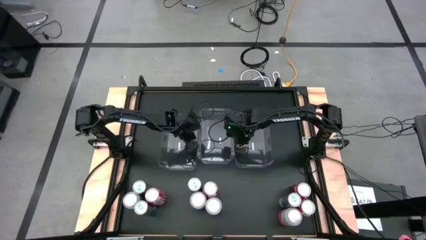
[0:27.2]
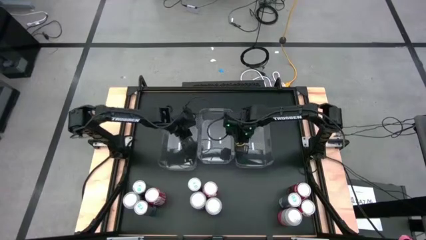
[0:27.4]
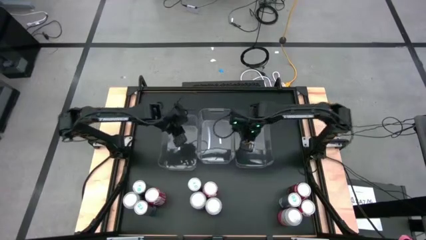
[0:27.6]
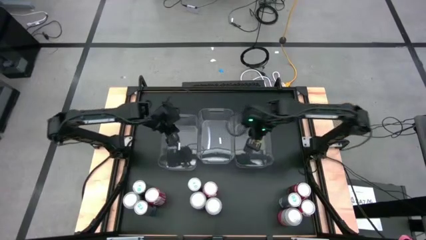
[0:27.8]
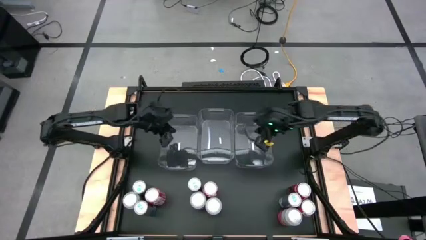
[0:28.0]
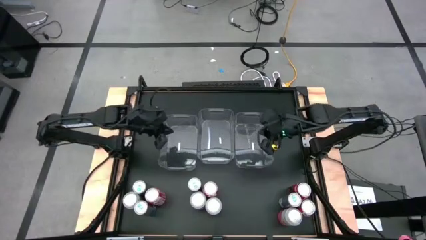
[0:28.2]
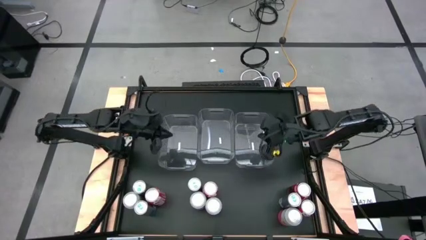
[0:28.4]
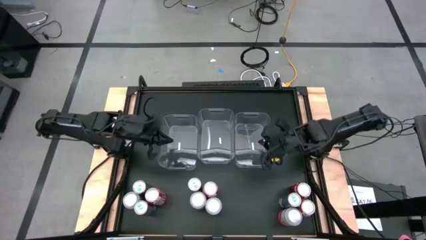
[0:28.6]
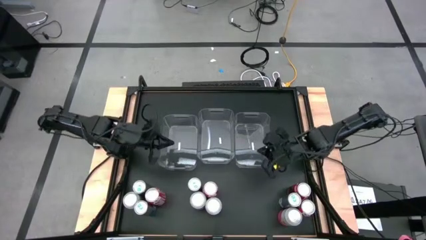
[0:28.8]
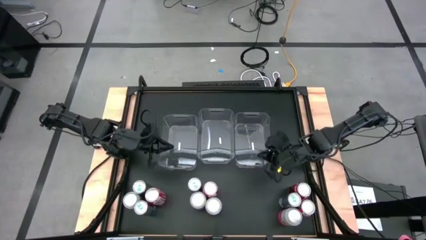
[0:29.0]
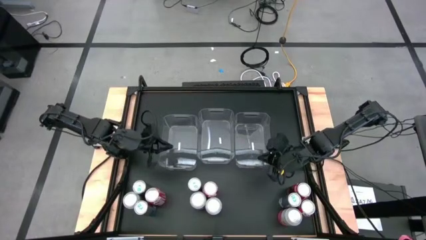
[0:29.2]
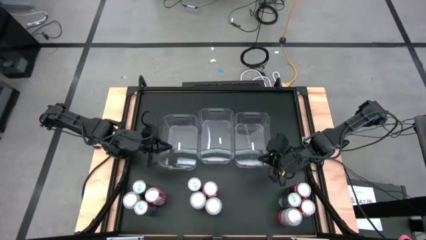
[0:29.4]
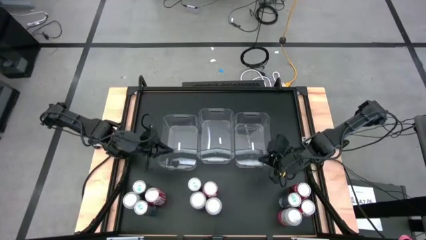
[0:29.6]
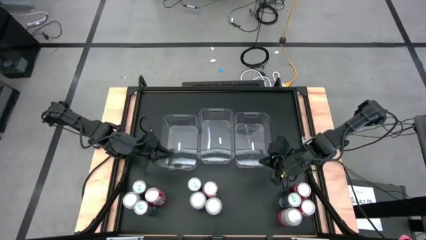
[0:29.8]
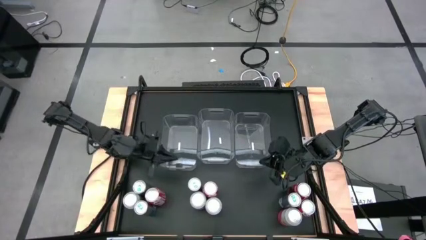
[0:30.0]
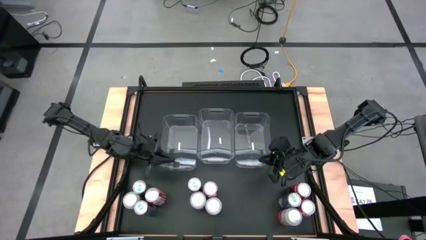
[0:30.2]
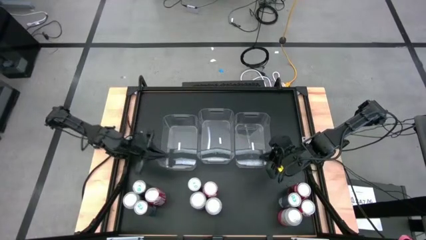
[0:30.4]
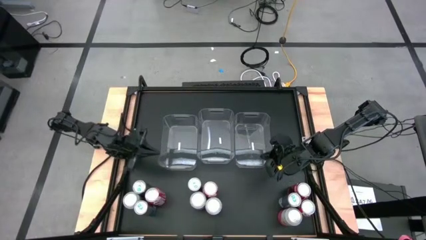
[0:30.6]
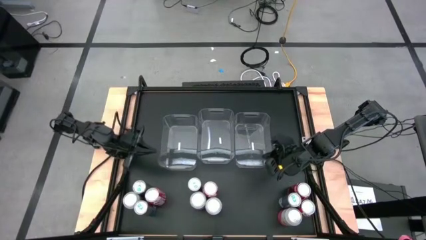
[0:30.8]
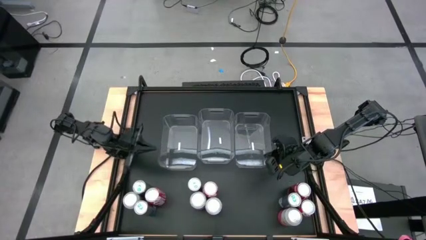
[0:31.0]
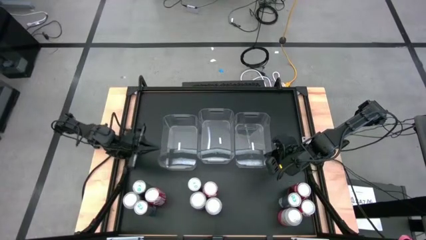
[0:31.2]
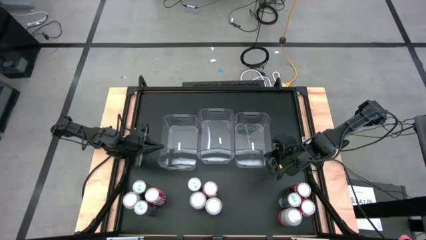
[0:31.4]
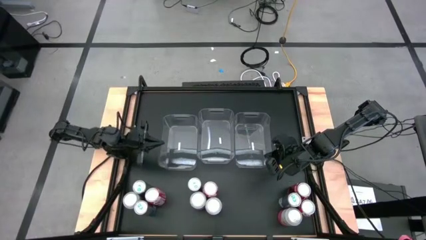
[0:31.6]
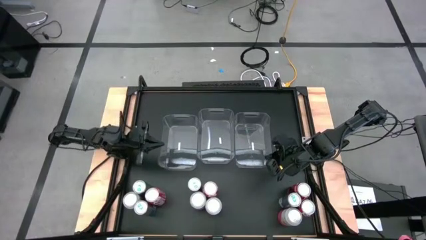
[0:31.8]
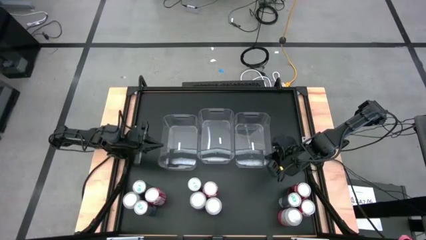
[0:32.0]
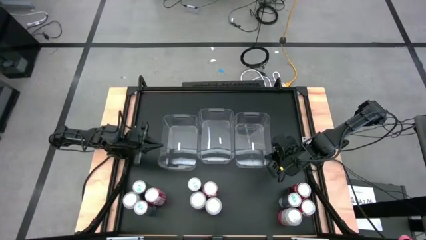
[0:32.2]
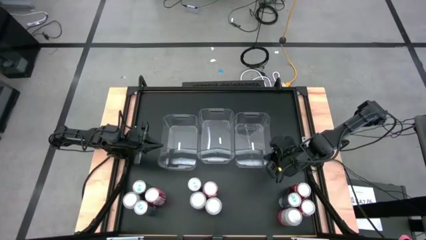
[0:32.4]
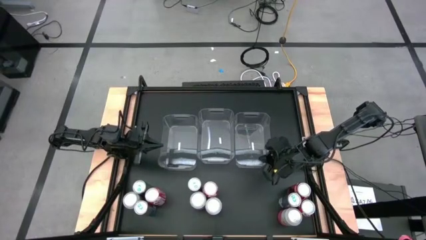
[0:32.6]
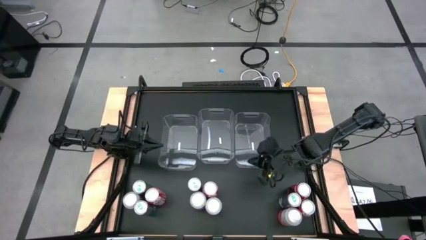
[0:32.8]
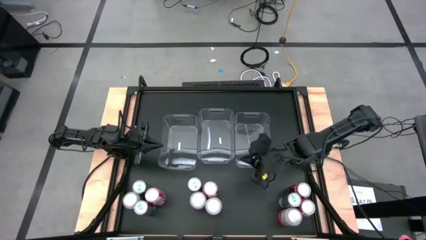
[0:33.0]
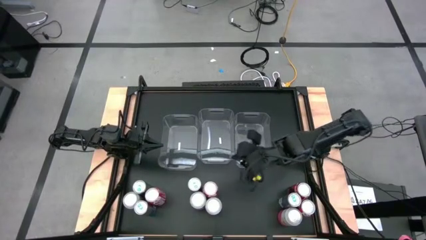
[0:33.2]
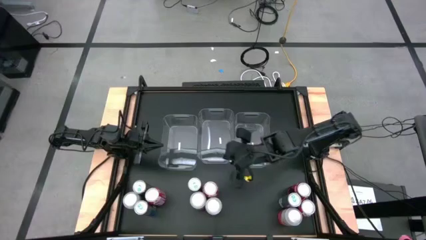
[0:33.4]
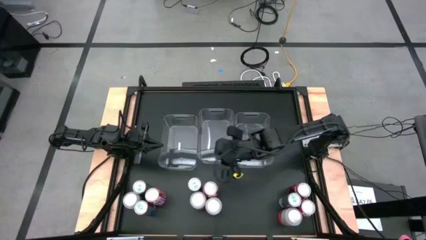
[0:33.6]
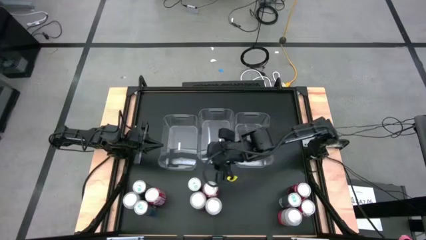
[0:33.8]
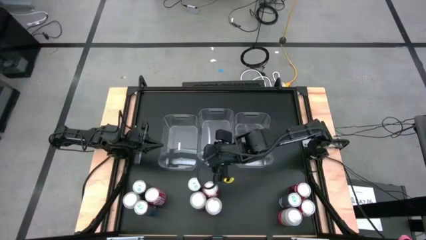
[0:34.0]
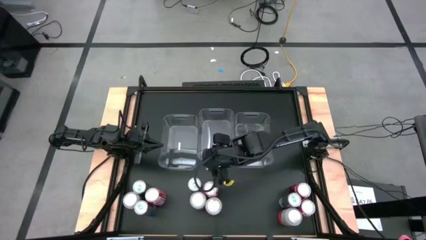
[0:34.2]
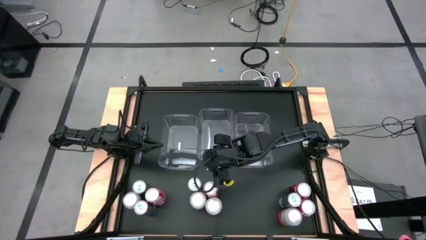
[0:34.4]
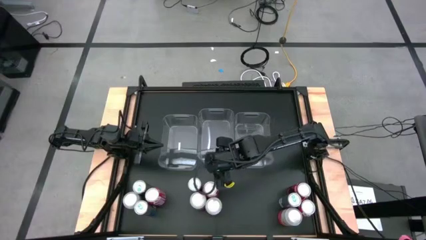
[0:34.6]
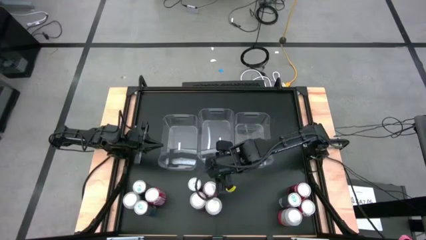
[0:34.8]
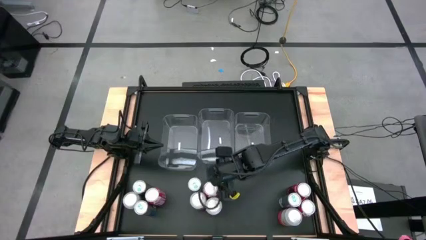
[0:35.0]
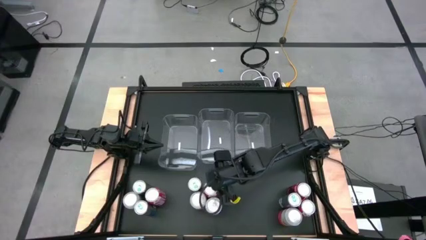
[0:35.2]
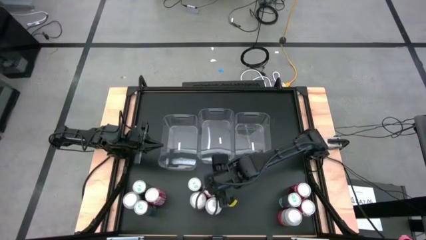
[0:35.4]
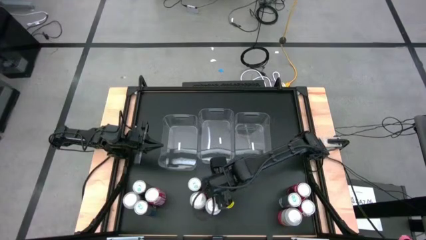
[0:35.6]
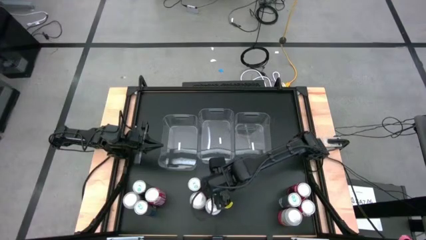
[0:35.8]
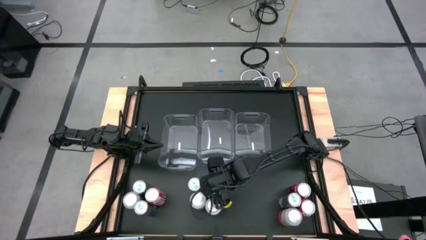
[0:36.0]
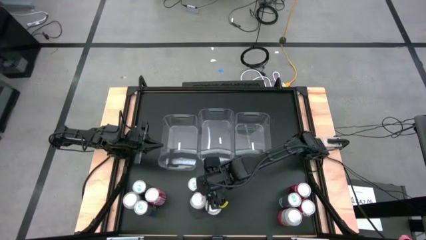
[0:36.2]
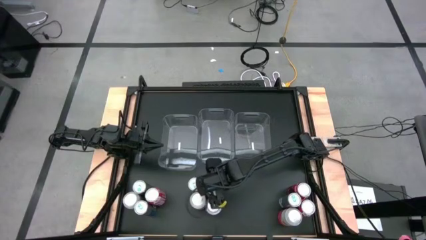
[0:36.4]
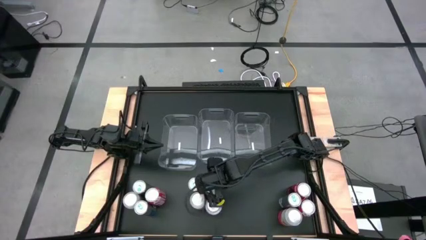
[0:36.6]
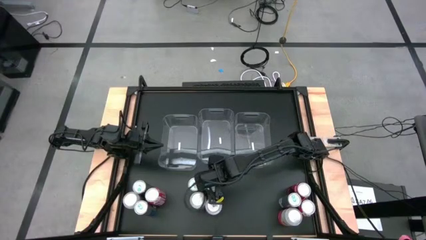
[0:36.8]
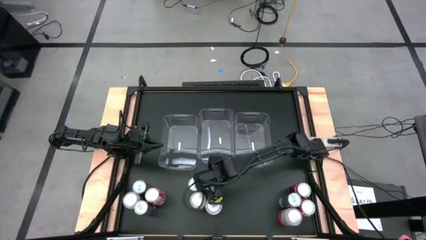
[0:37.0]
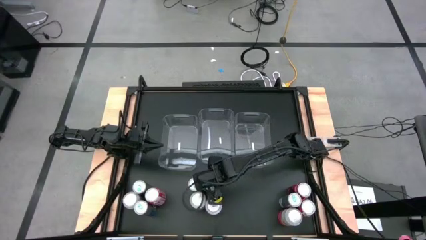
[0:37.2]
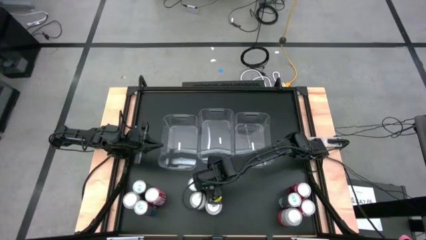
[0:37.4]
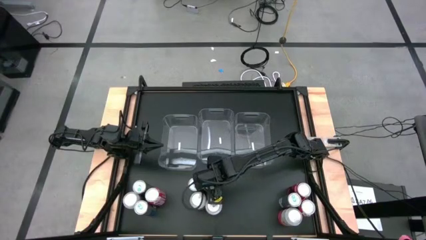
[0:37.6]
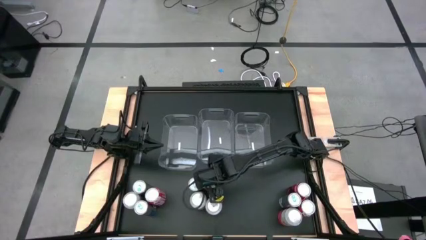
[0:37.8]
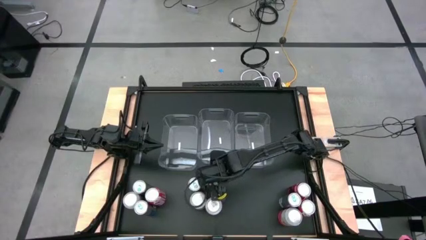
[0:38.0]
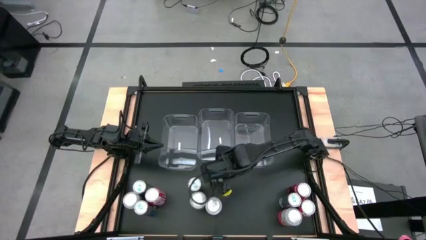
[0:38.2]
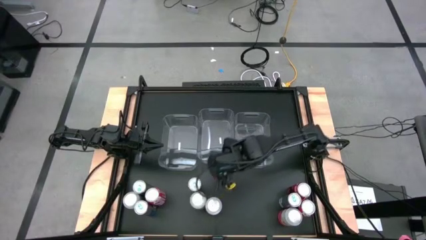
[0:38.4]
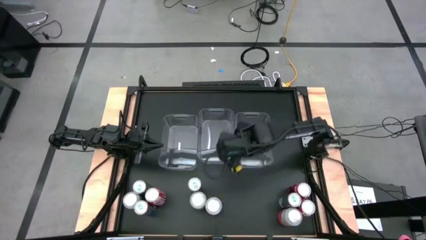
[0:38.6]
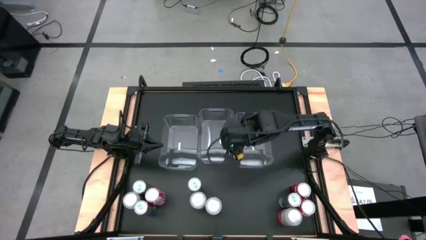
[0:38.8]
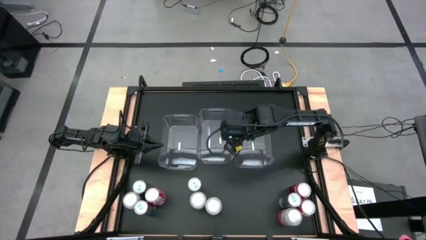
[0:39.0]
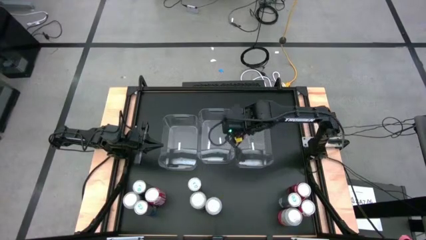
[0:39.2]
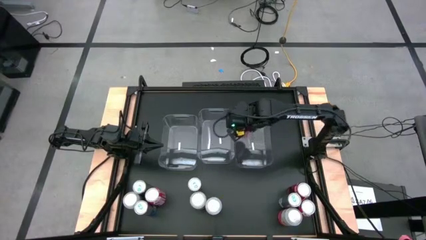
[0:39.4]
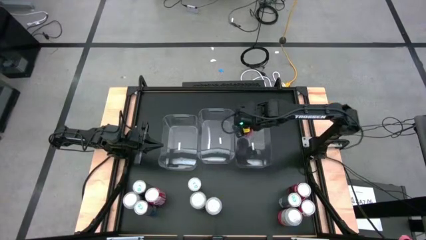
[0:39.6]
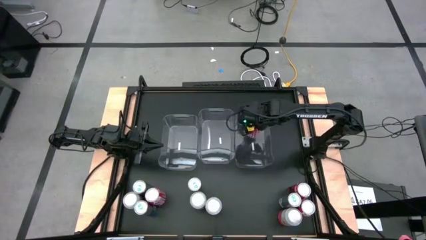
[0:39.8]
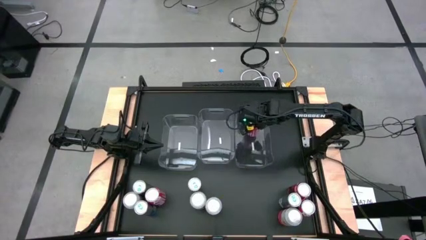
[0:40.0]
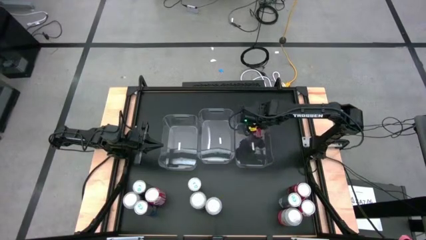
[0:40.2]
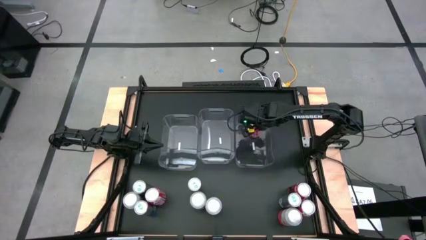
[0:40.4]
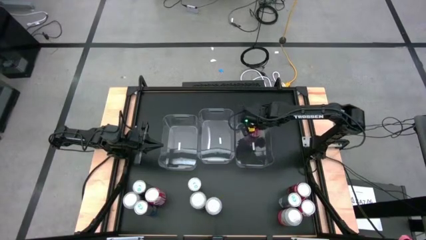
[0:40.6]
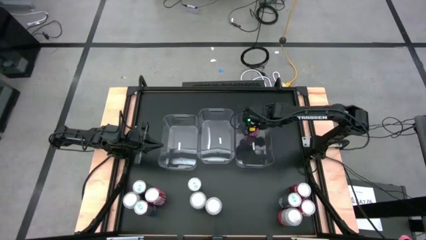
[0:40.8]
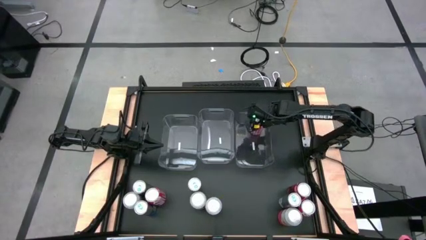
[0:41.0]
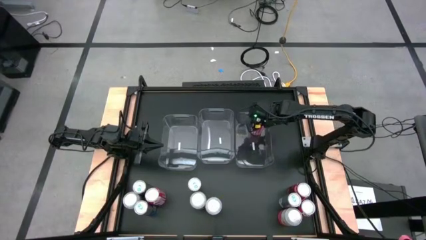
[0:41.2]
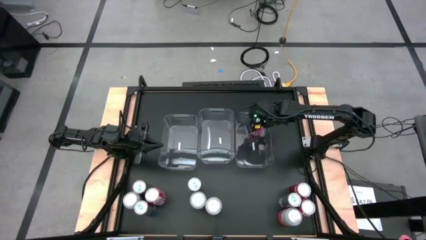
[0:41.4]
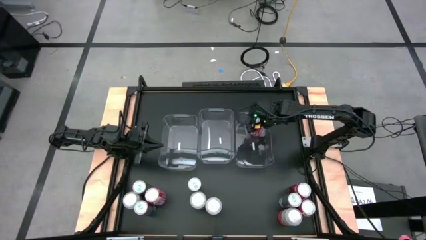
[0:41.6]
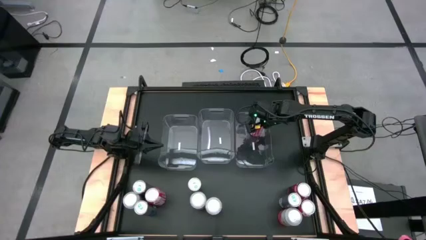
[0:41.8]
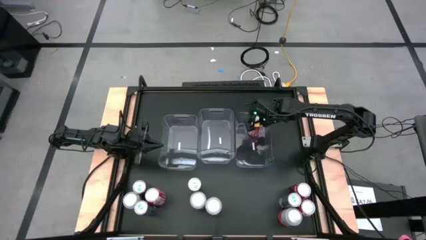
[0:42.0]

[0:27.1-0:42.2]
Task: Sort soda cans
Put the bottom center red soda can into the right transparent bin
